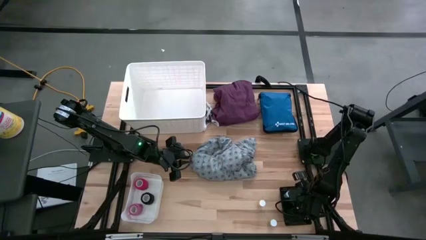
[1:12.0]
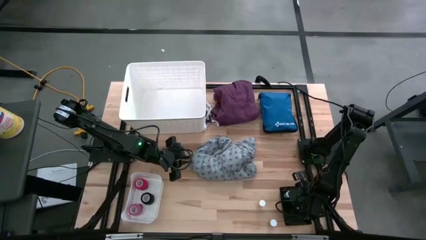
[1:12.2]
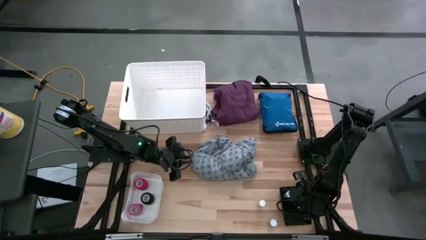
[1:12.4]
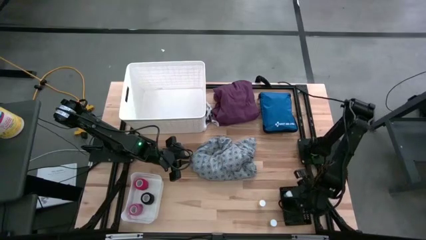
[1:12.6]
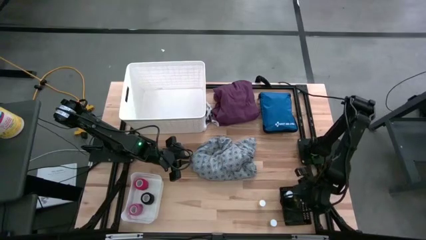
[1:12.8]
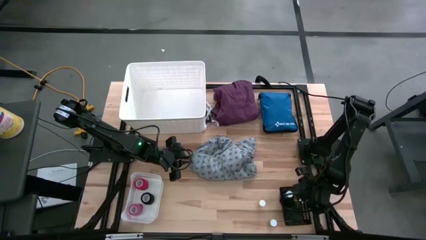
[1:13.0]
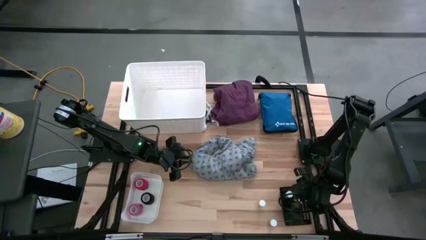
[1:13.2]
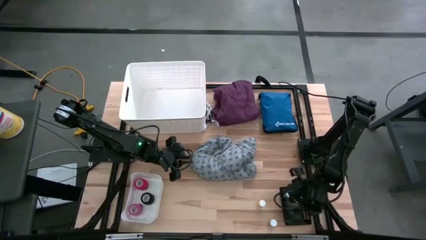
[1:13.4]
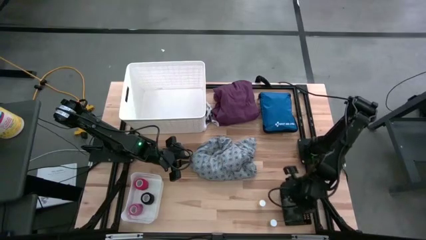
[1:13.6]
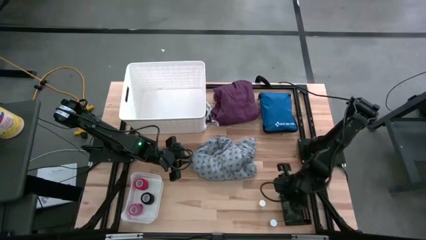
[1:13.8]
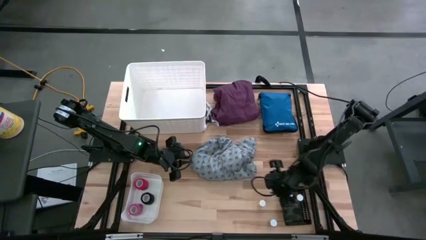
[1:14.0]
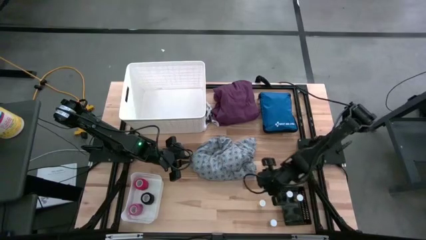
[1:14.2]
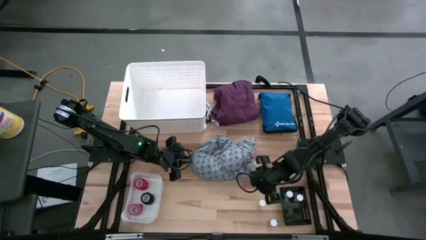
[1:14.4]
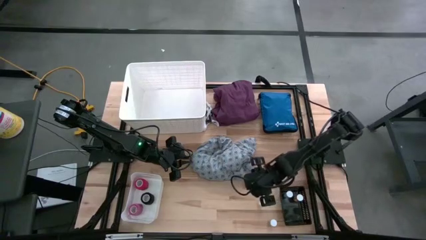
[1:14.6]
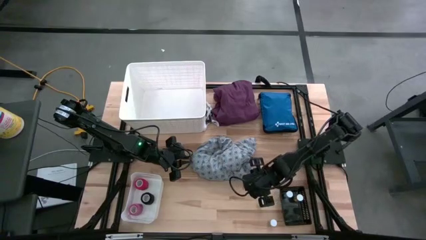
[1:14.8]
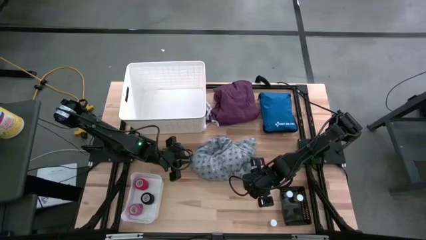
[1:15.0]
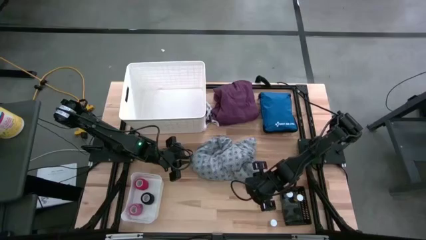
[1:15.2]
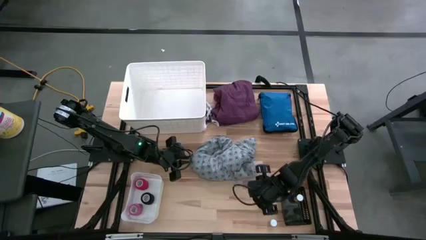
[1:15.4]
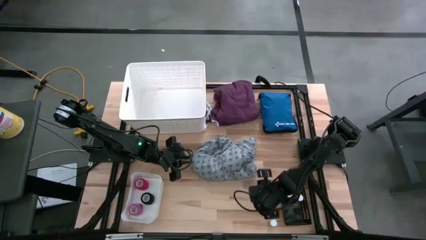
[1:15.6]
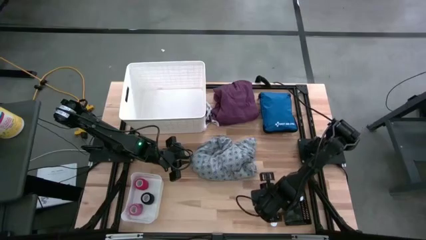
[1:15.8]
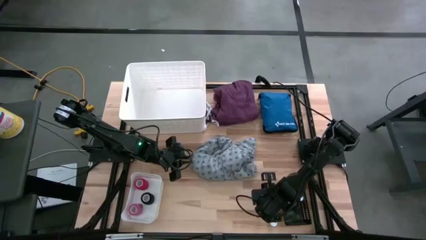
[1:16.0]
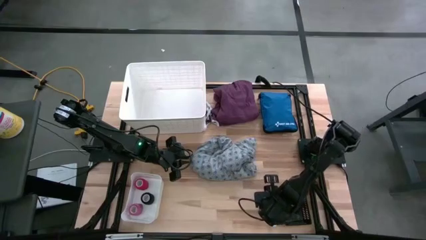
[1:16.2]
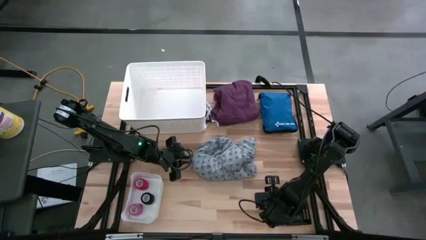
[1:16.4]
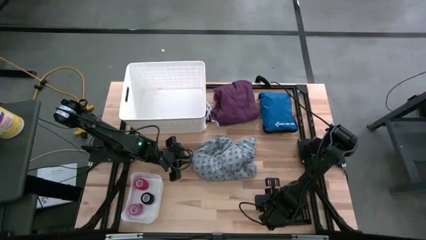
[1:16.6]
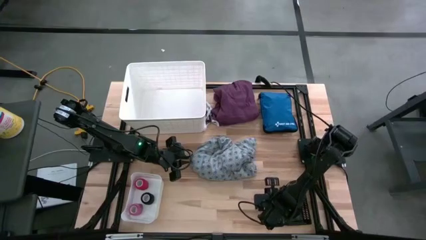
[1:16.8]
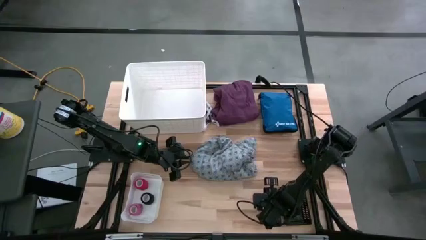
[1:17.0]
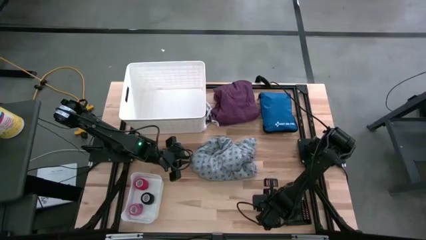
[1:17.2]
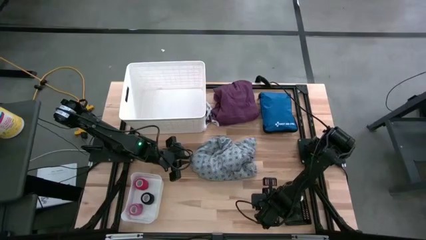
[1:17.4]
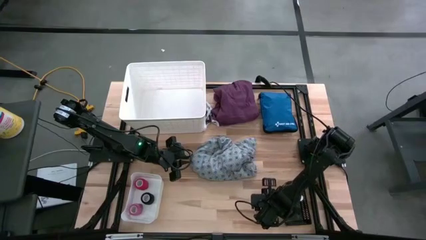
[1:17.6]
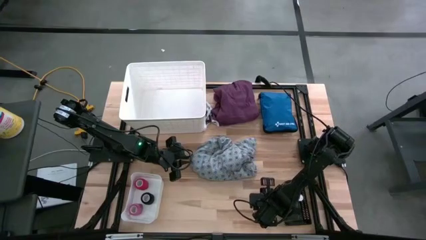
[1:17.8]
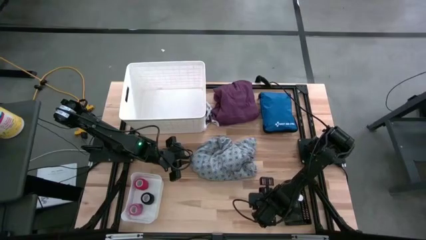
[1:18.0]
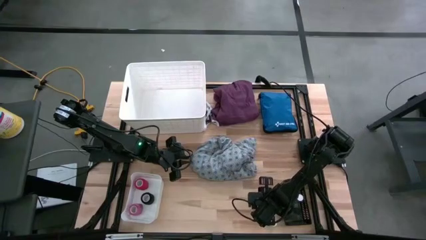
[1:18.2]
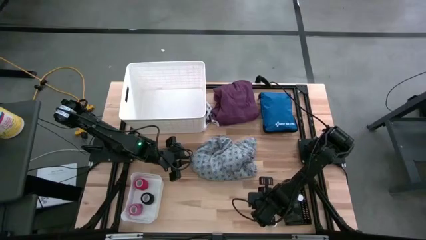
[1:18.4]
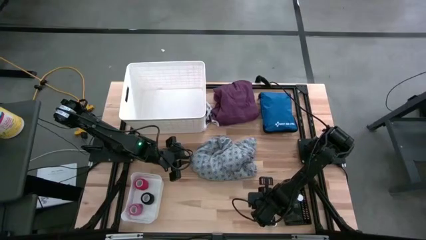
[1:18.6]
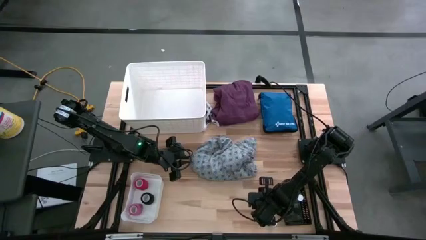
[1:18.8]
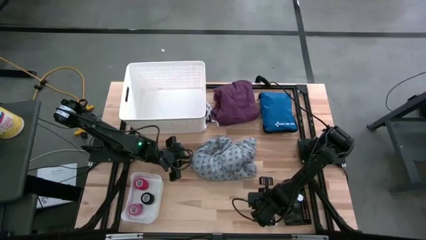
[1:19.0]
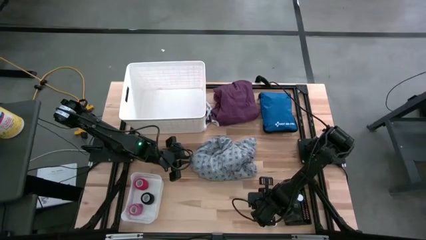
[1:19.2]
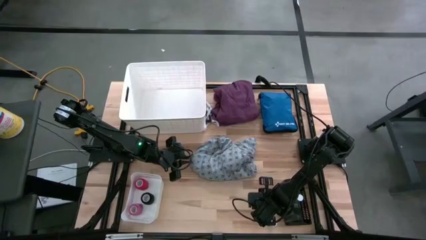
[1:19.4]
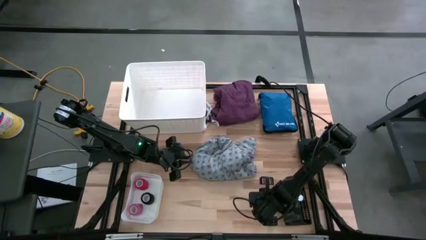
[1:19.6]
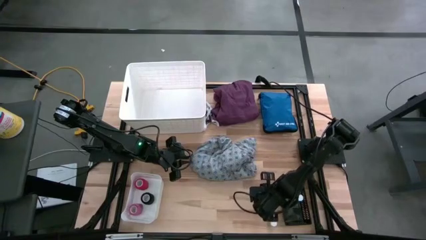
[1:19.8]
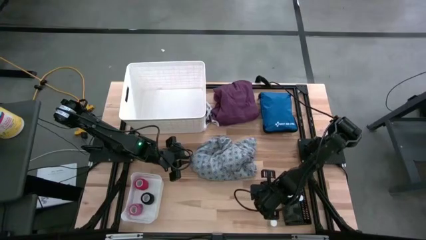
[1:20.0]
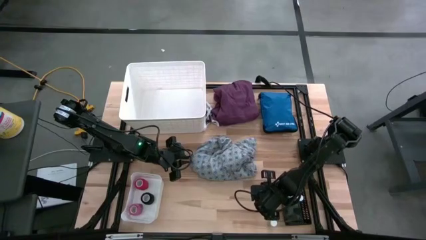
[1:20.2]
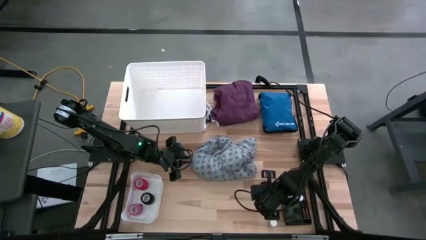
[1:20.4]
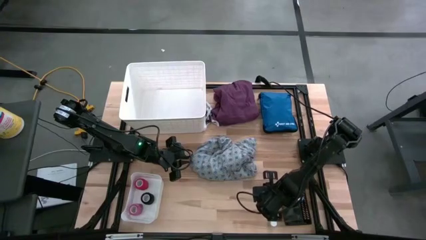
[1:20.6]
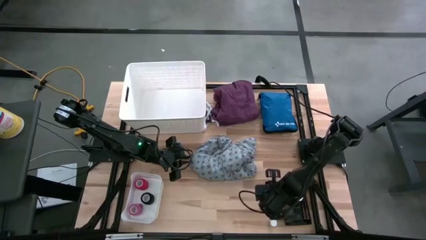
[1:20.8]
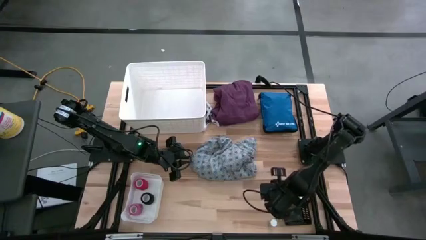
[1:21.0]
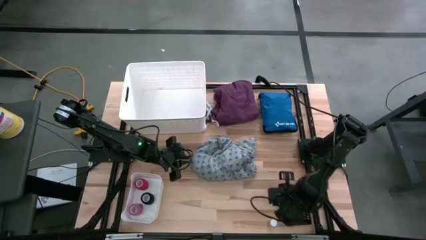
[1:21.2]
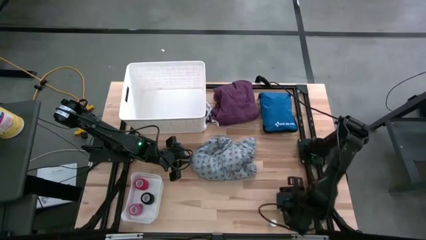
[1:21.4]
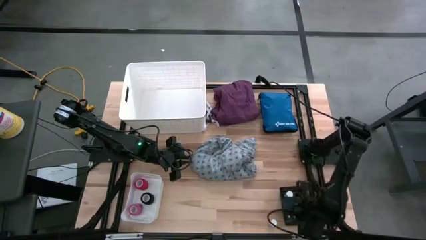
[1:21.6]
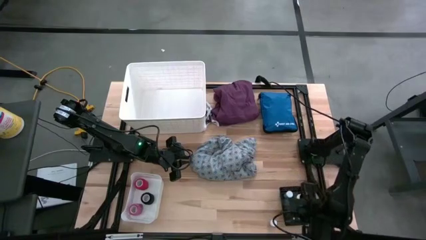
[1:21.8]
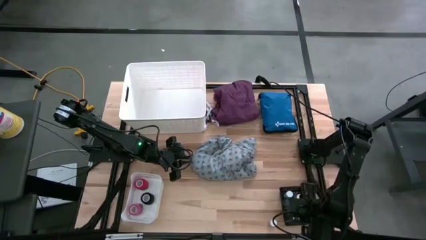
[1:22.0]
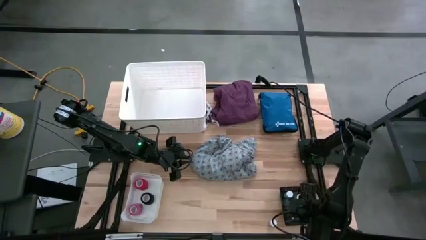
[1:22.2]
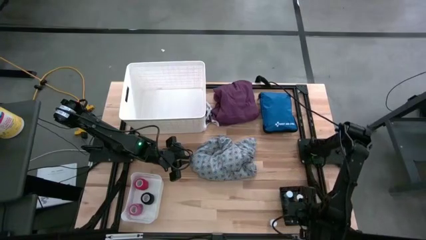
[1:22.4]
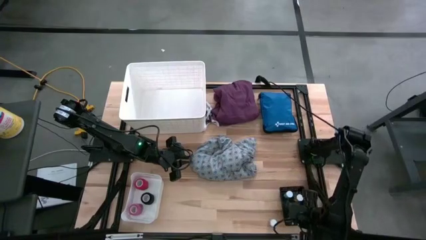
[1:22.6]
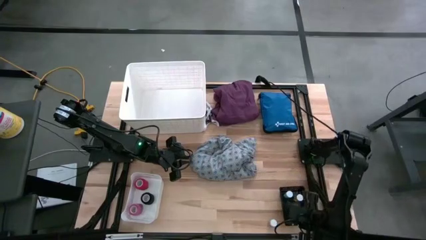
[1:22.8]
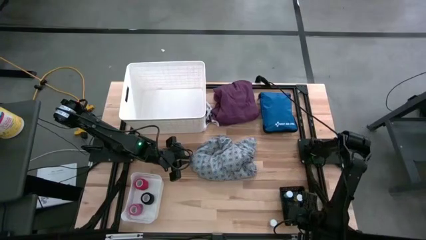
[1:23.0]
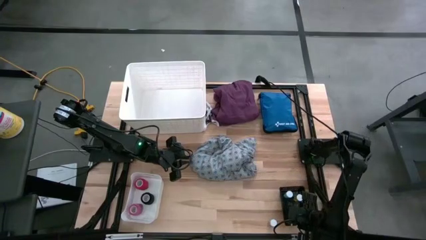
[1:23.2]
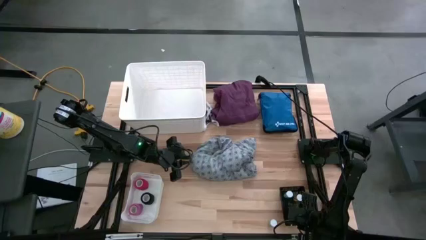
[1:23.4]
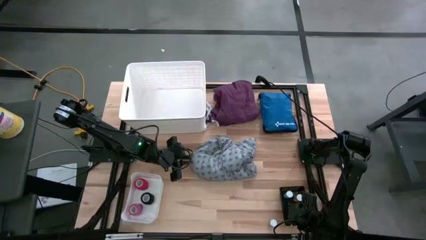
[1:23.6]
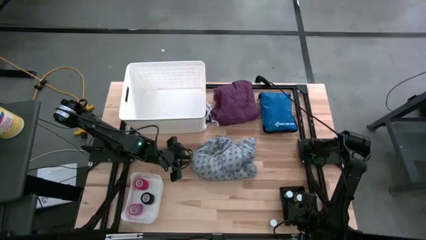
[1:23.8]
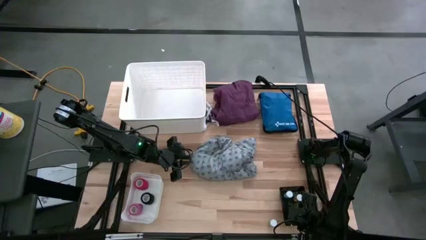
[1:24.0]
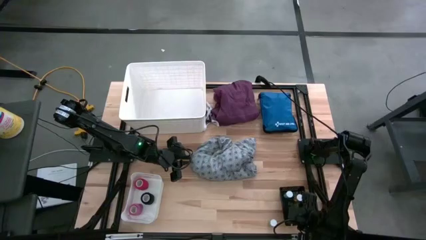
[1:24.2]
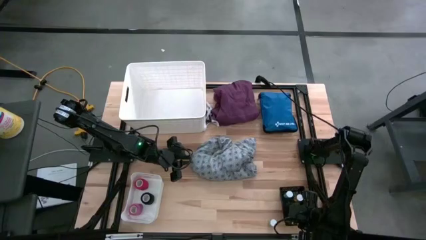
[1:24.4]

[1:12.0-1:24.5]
Task: Pick & place medical supplies in basket/bin
Put the yellow pill bottle into the black bin
